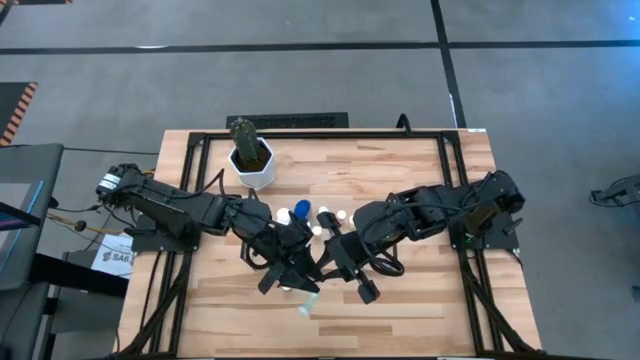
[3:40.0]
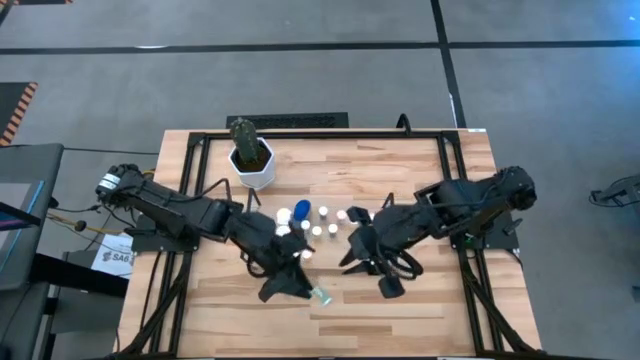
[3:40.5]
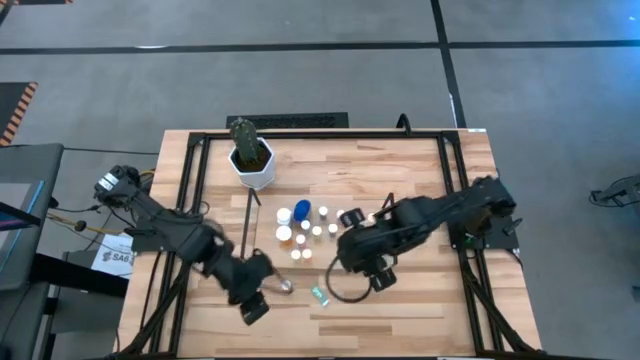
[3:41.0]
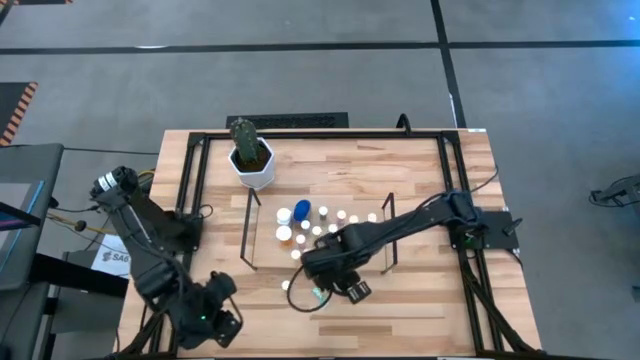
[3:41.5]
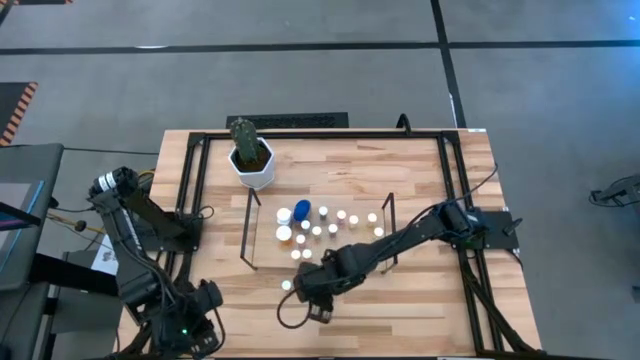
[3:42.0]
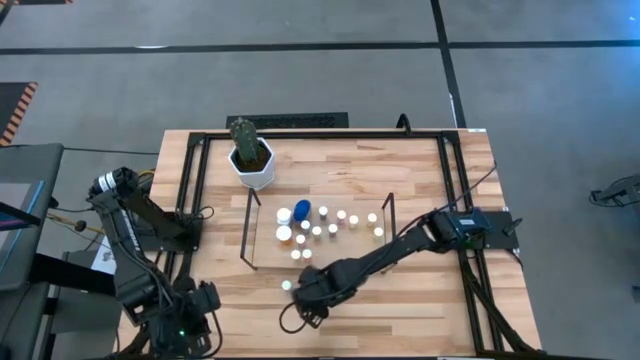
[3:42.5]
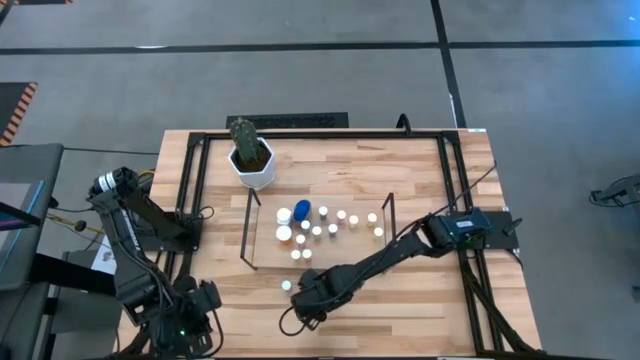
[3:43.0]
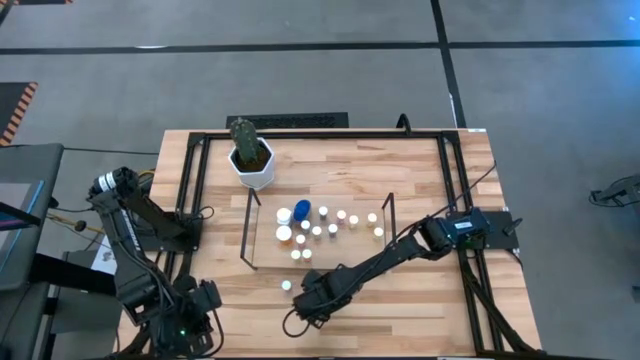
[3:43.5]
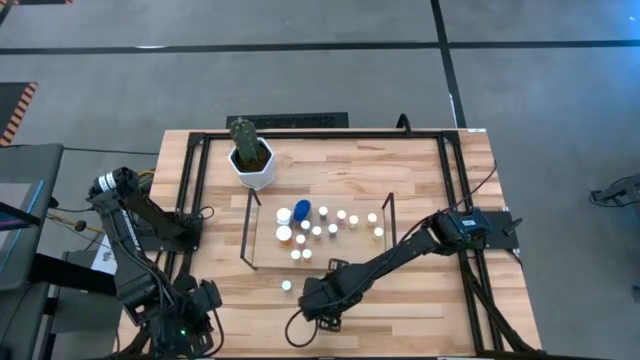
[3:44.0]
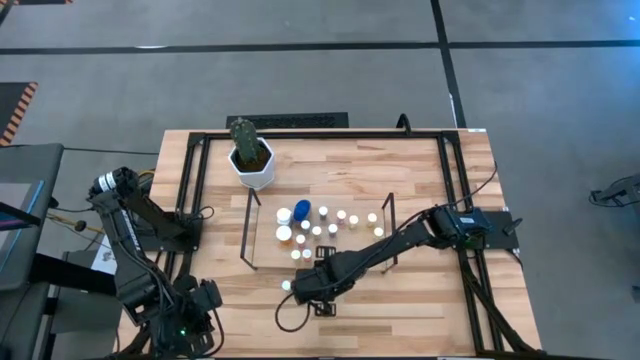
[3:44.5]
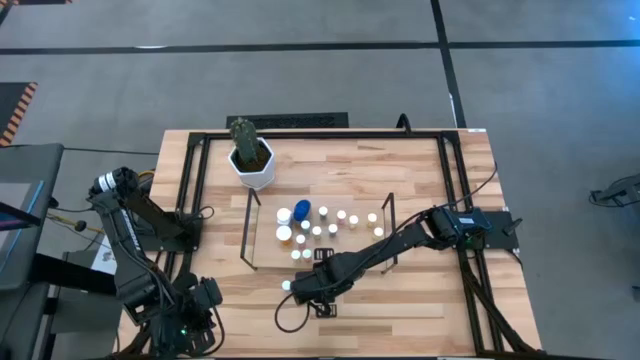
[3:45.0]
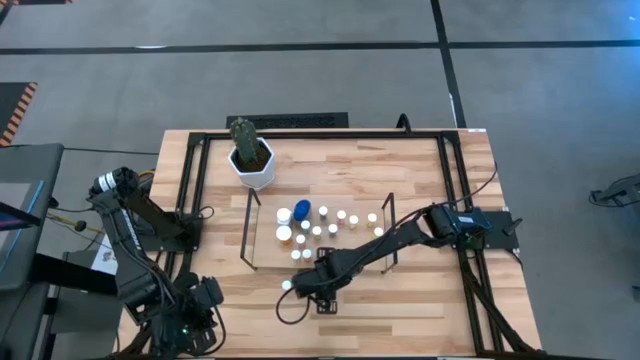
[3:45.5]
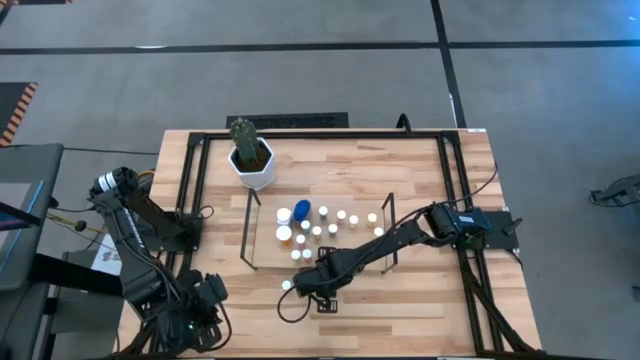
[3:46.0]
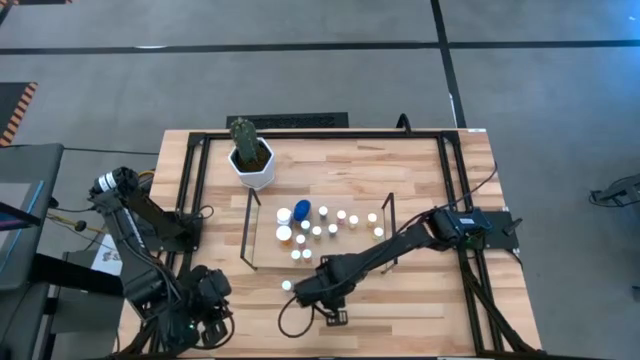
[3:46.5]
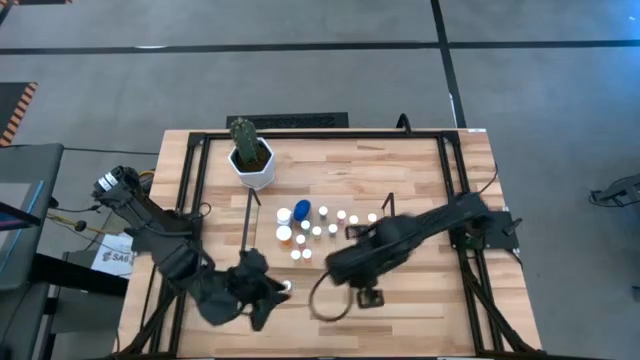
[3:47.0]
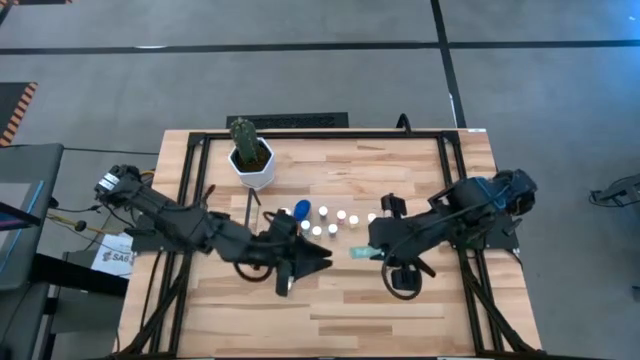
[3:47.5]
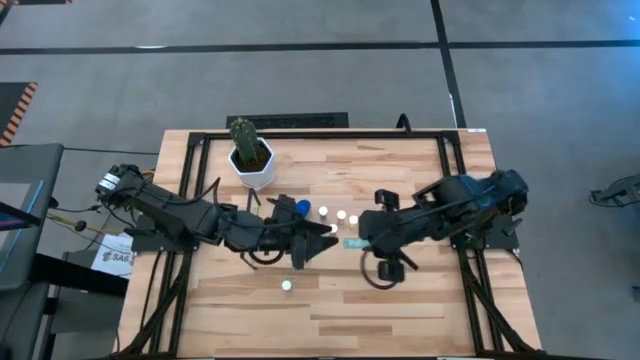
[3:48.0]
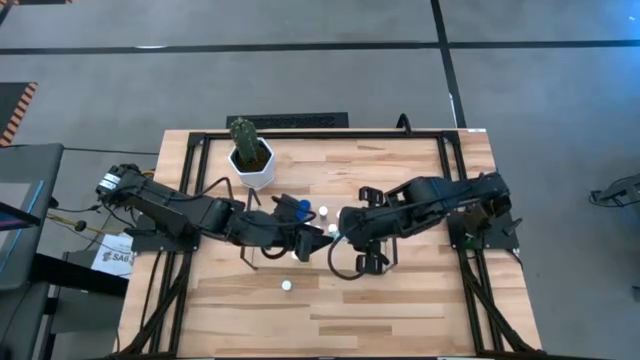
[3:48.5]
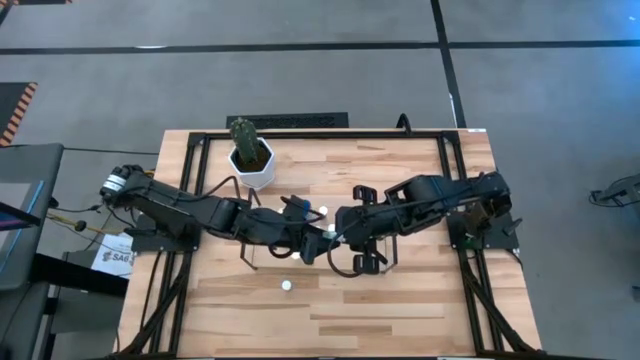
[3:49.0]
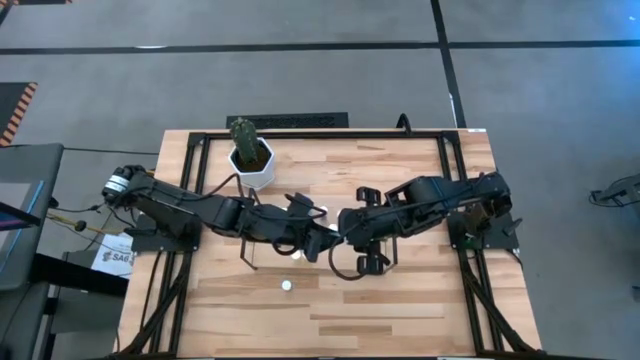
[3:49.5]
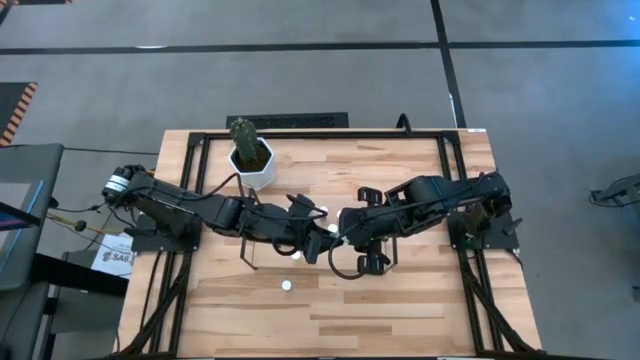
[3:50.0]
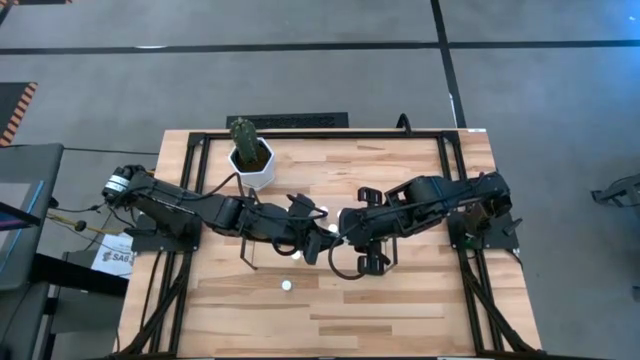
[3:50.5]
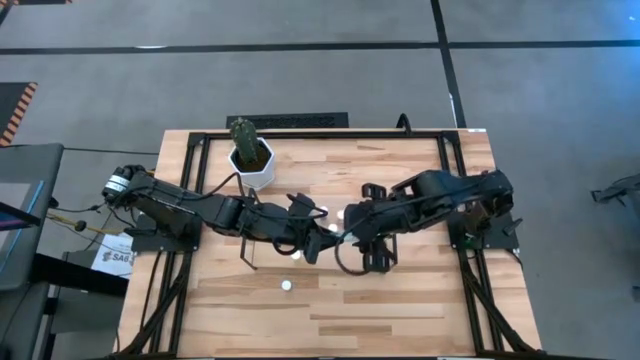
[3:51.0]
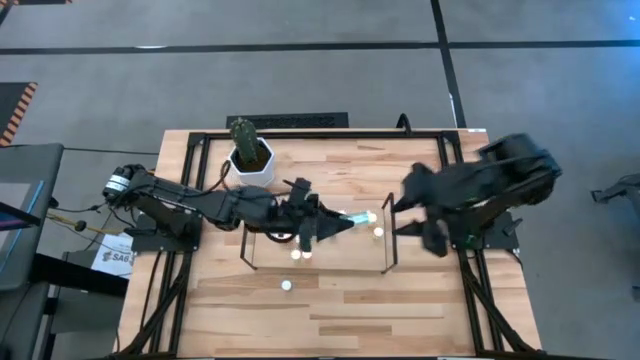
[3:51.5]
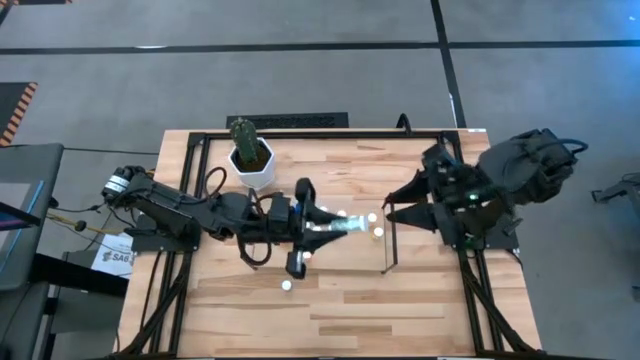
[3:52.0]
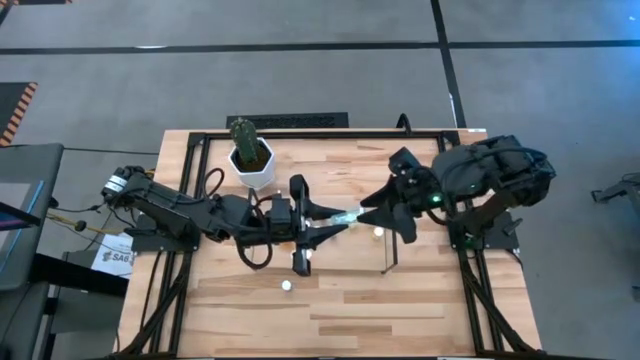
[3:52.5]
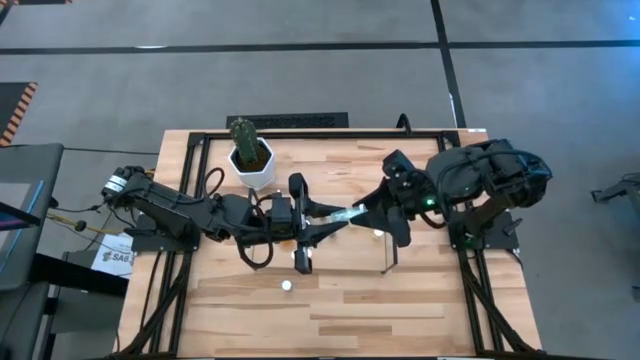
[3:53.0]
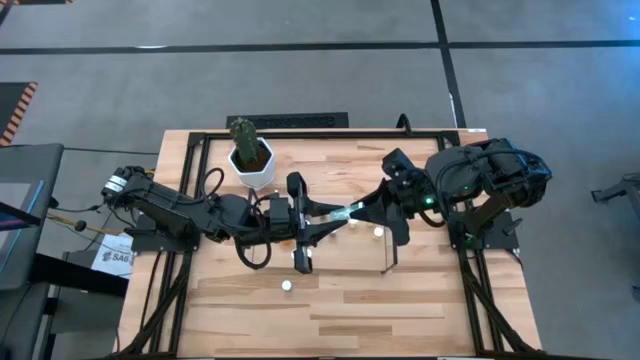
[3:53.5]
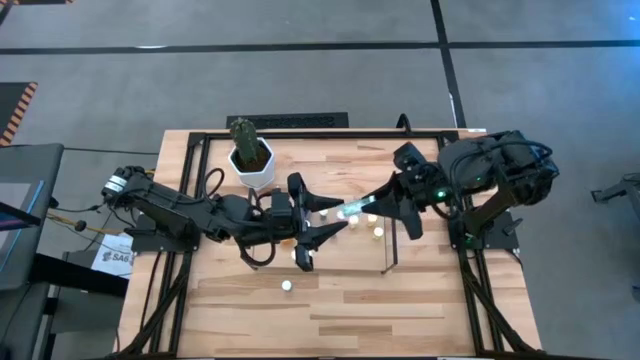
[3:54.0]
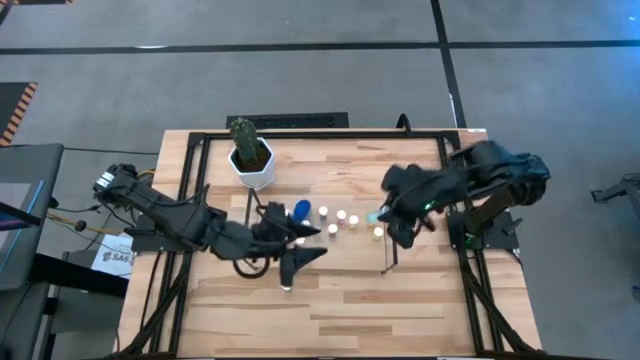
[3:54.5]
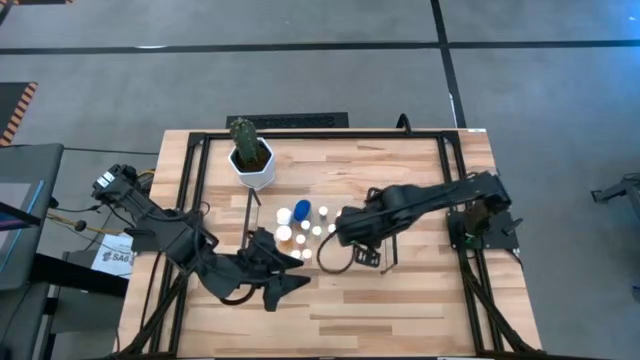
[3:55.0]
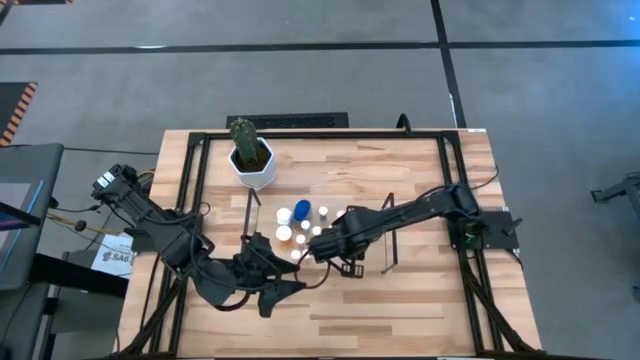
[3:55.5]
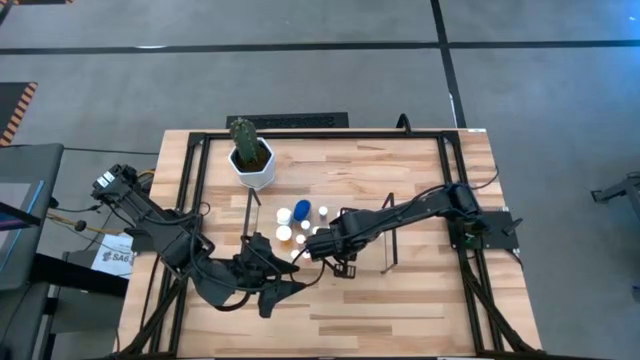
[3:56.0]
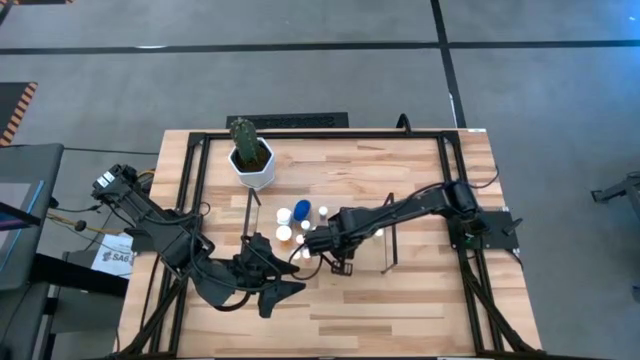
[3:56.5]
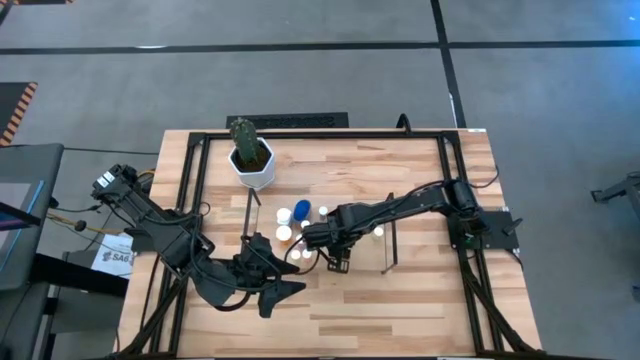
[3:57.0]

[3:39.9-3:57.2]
Task: Pick and place medicine bottles onto shelf by color
Put the blue pill bottle on the shelf

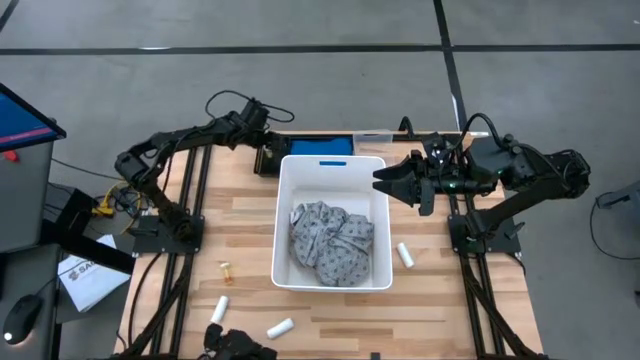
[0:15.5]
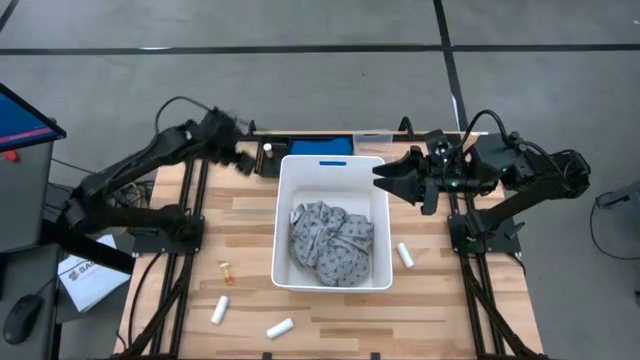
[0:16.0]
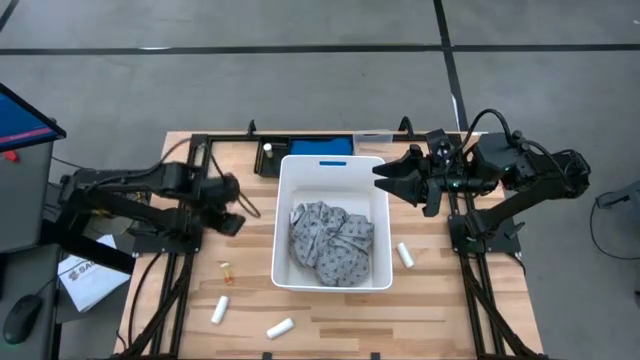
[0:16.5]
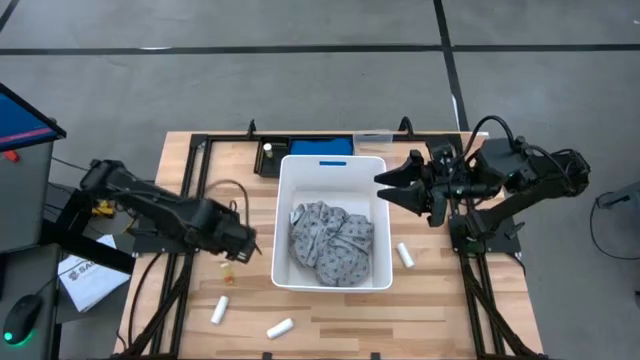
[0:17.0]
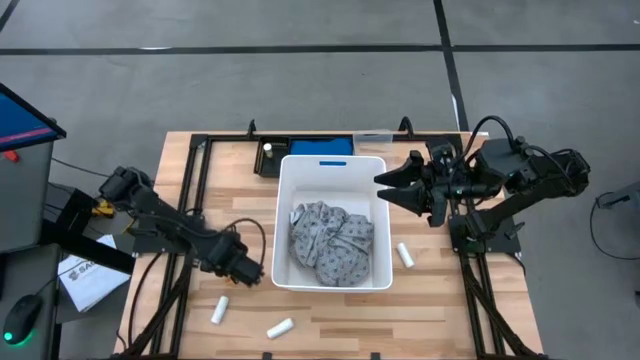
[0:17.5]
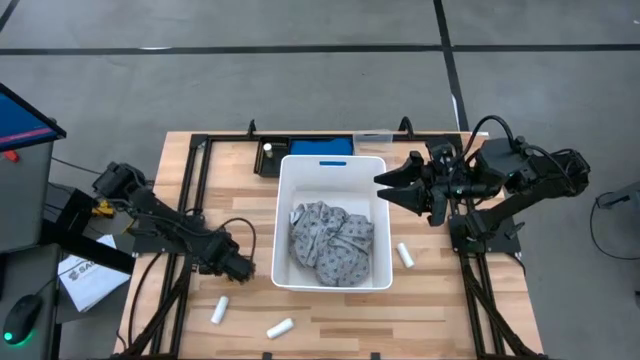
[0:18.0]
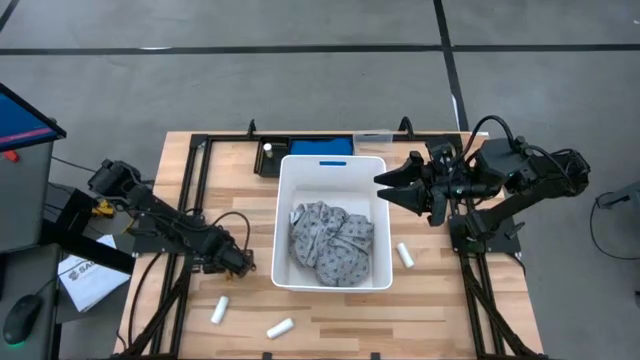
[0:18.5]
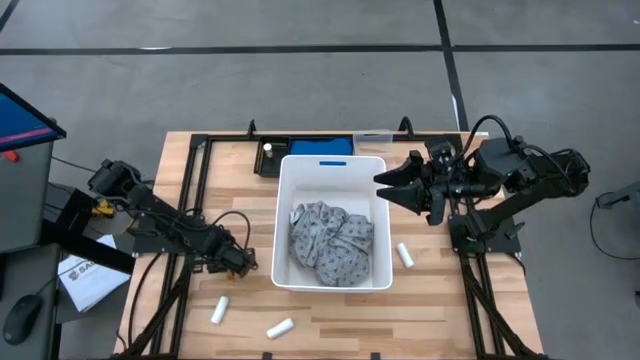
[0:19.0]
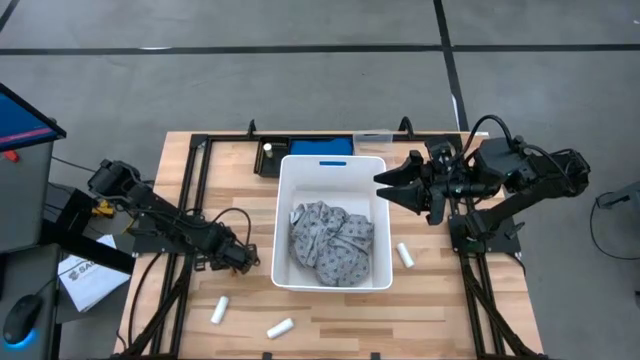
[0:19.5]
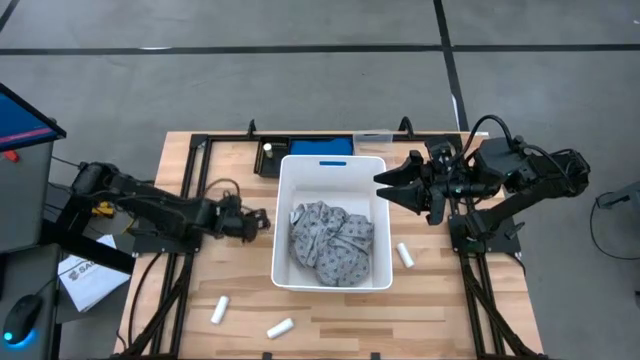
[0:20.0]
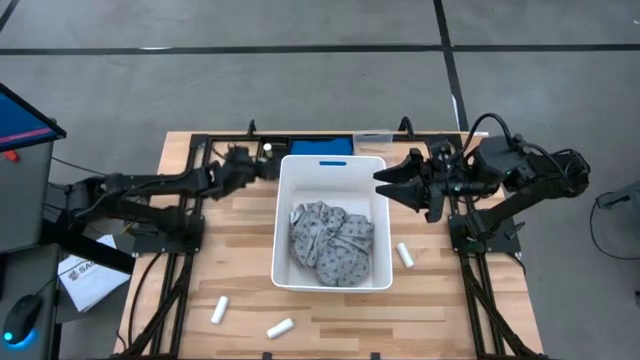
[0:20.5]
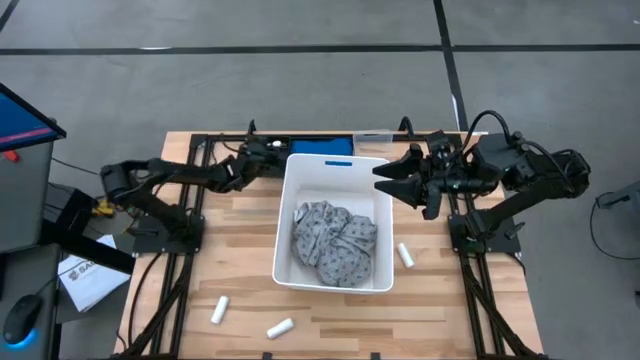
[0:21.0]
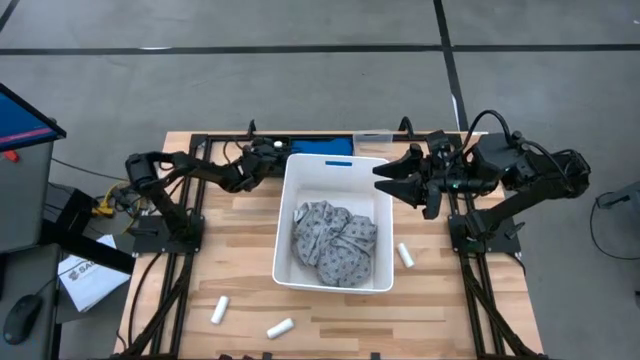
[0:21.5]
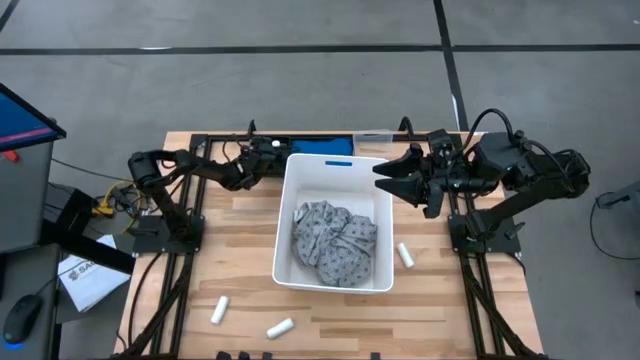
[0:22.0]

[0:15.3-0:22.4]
Task: Pick & place medical supplies in basket/bin
Put the yellow pill bottle into the left black bin
